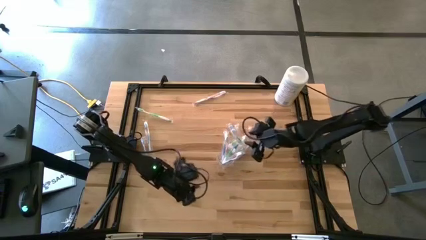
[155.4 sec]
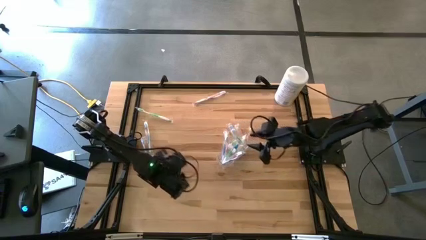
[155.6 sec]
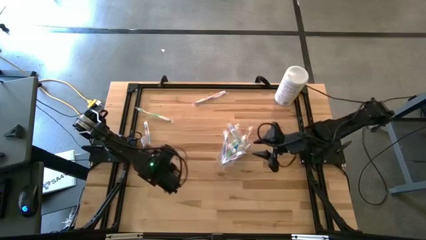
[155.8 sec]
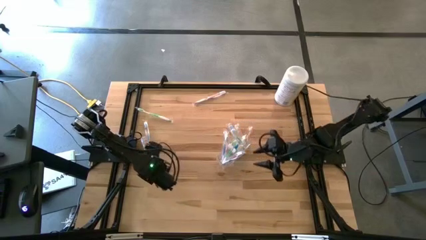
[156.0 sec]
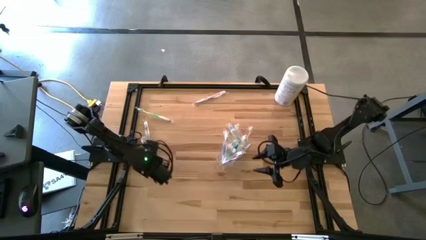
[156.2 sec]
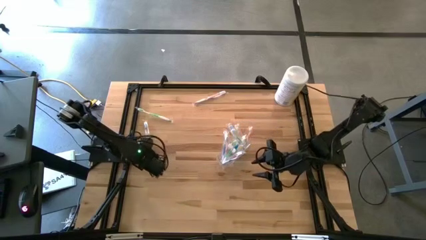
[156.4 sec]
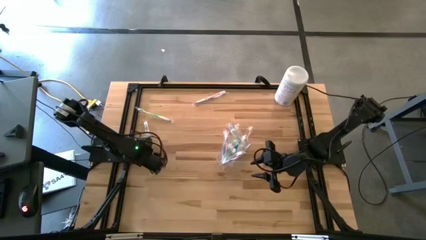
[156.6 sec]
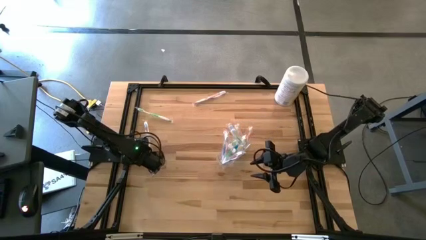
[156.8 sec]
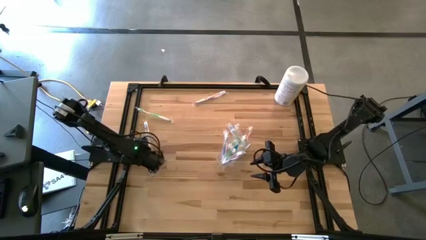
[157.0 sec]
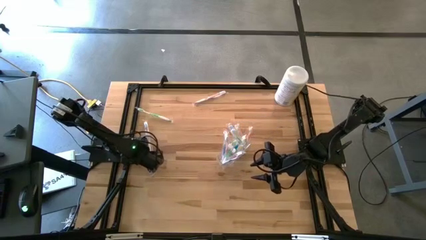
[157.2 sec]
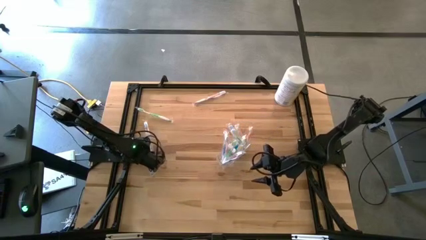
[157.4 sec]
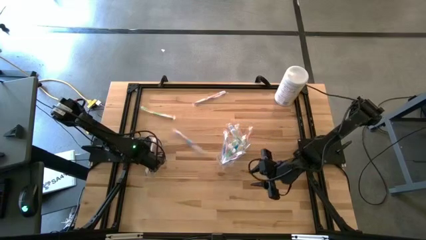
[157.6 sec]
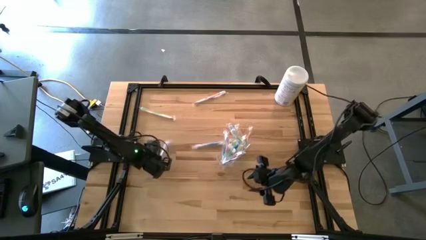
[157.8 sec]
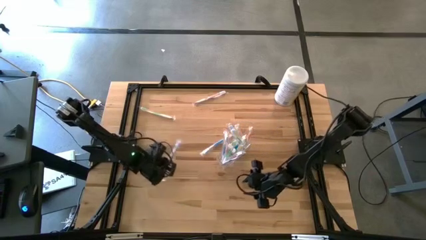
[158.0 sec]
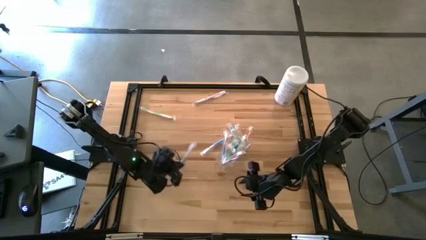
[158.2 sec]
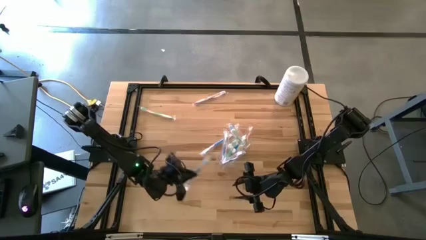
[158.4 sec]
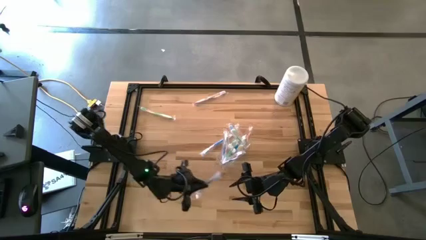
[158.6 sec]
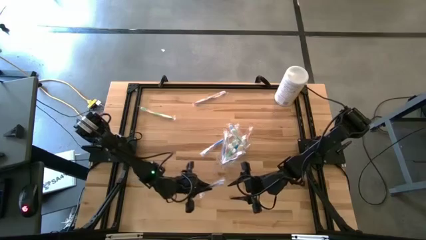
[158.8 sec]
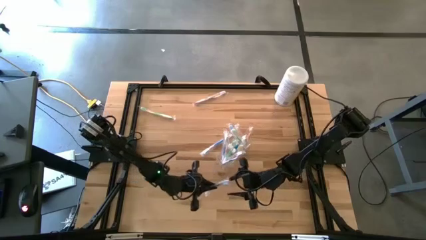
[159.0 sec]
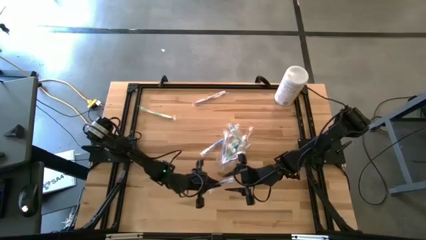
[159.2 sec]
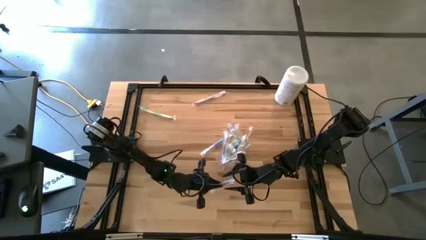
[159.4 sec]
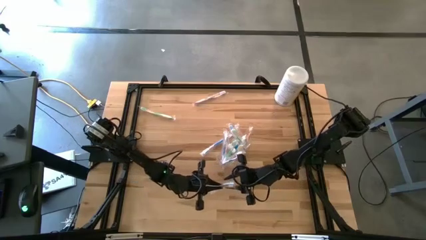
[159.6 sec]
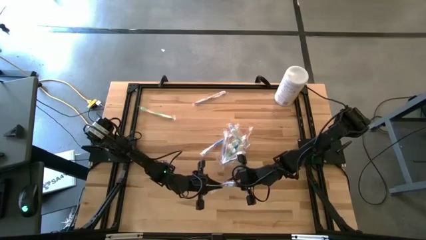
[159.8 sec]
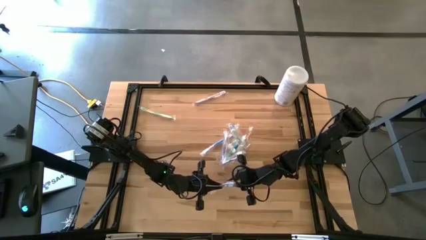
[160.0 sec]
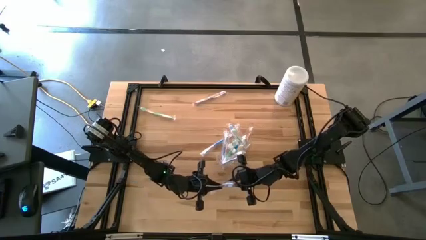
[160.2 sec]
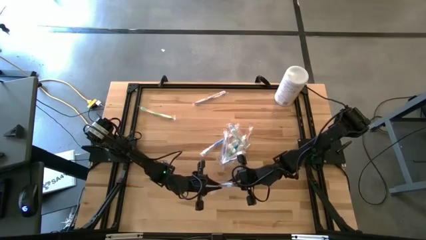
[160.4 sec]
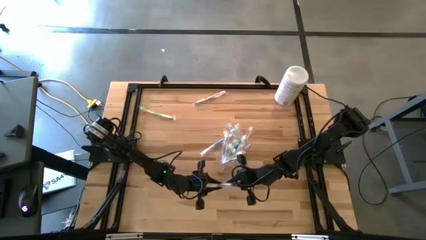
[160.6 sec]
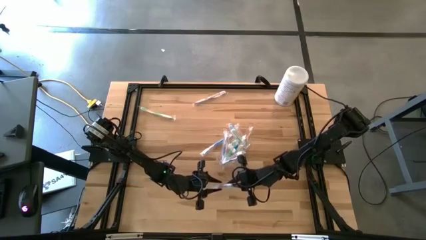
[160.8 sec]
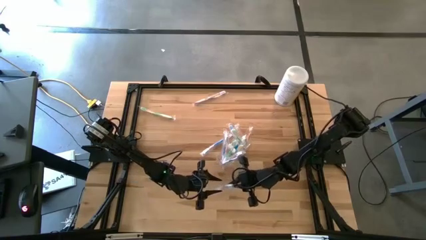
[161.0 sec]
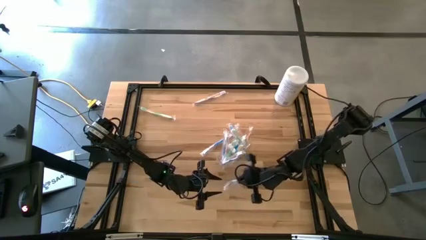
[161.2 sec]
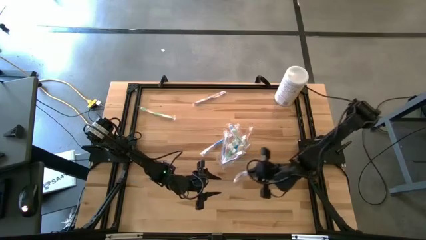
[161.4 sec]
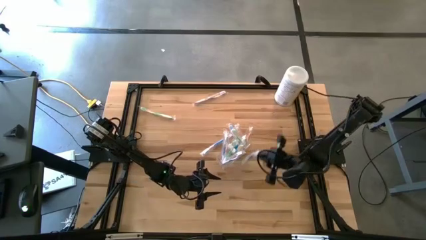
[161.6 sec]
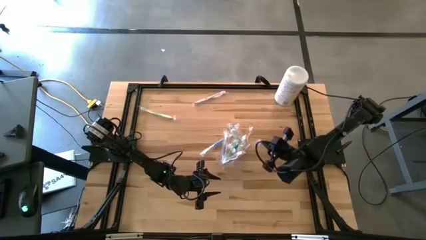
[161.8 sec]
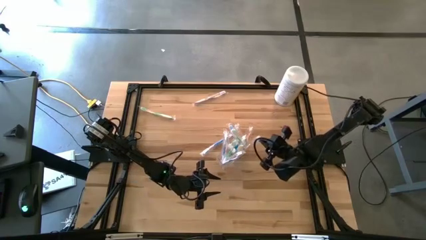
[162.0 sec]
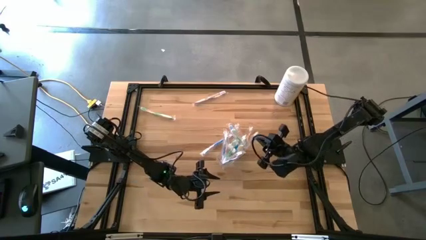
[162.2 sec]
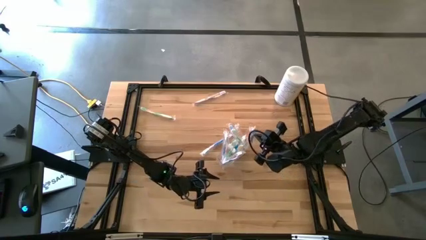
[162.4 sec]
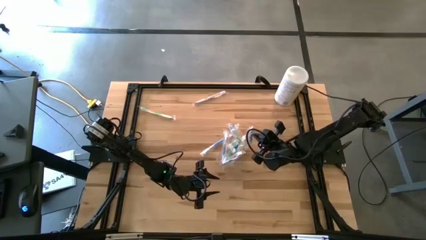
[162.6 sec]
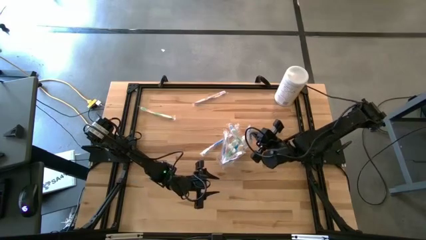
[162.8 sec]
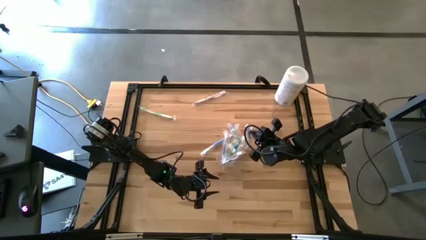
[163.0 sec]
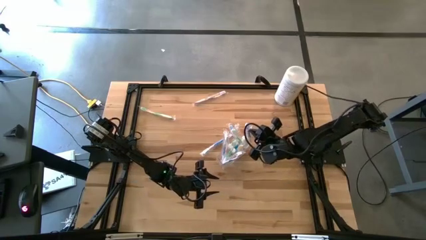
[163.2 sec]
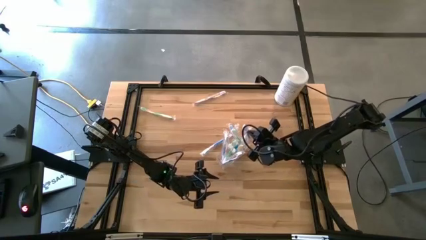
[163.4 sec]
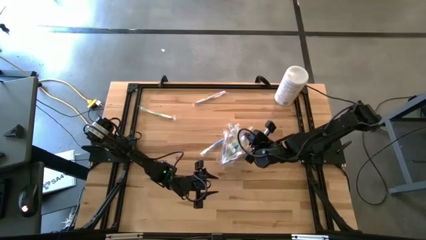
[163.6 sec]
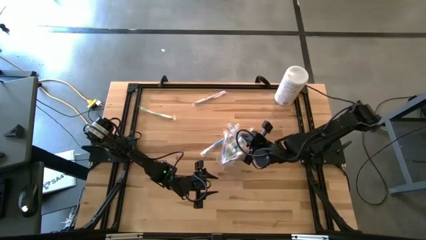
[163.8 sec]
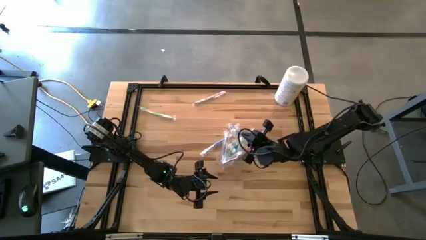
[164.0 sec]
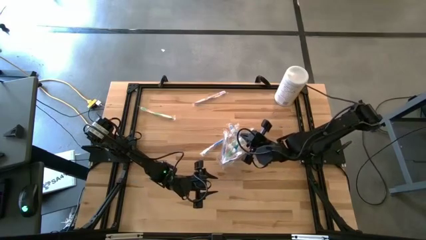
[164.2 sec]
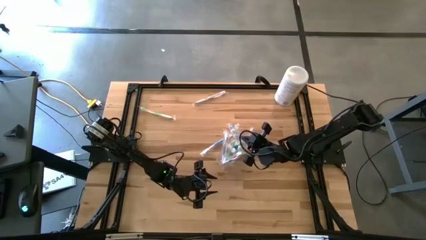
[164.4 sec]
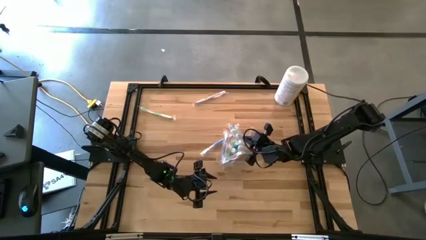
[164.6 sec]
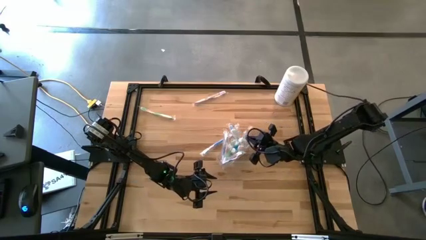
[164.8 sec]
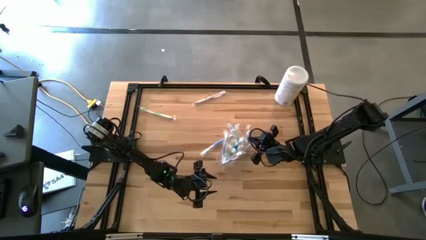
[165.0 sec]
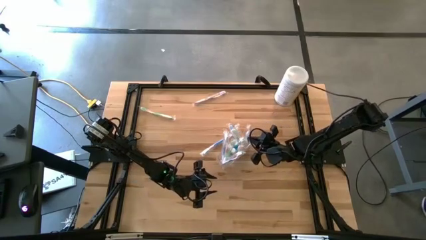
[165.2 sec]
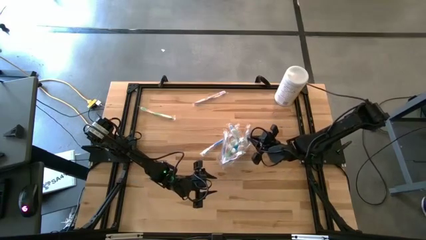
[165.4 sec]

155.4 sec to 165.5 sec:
Task: Pick & Place toothbrushing station
Put the blue toothbrush into the transparent organizer
